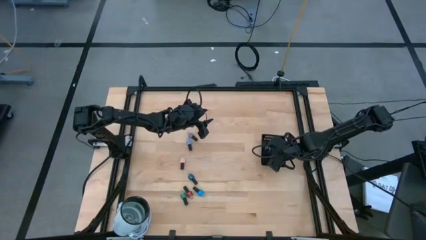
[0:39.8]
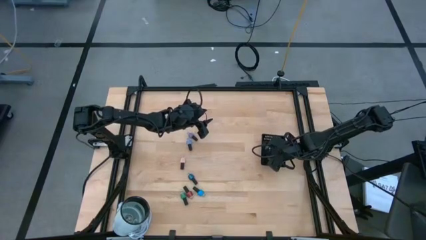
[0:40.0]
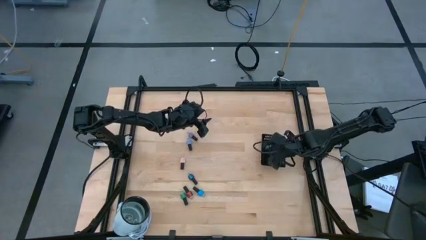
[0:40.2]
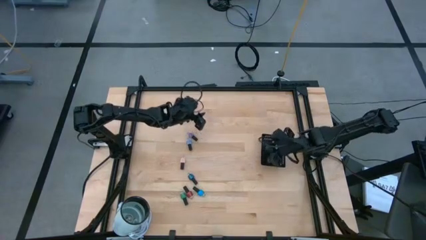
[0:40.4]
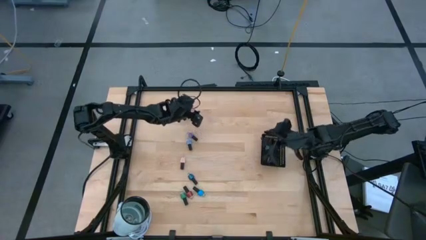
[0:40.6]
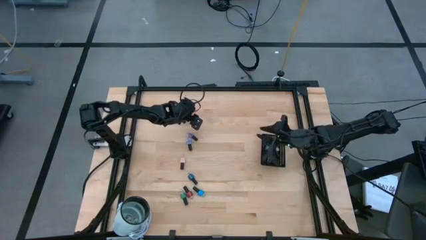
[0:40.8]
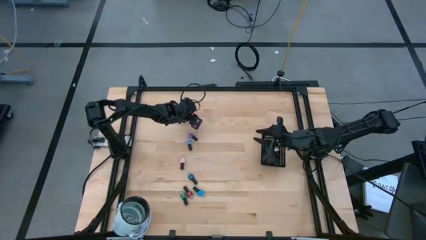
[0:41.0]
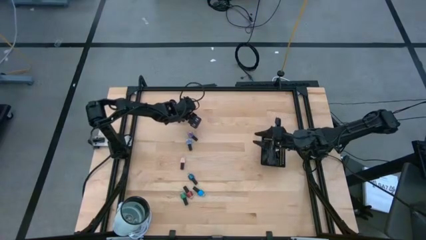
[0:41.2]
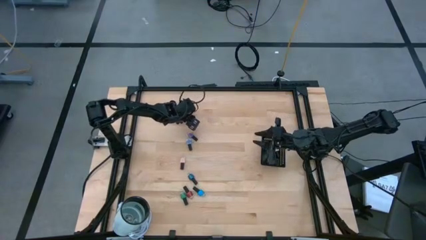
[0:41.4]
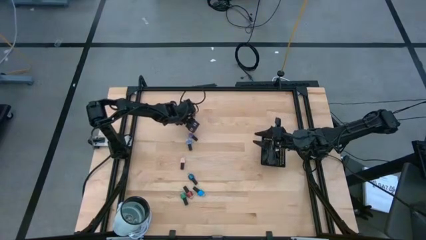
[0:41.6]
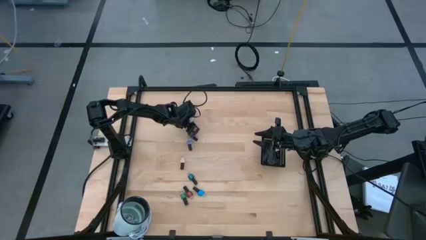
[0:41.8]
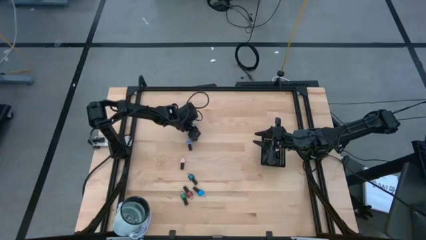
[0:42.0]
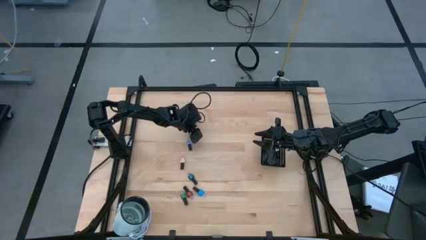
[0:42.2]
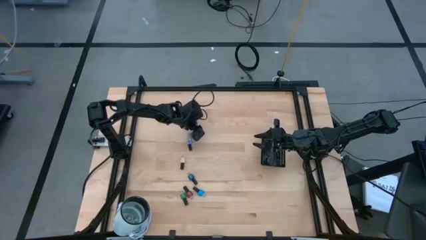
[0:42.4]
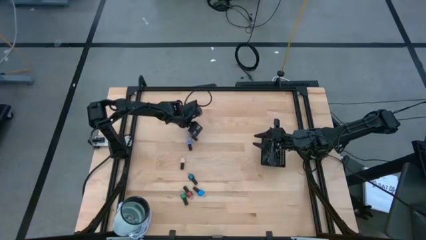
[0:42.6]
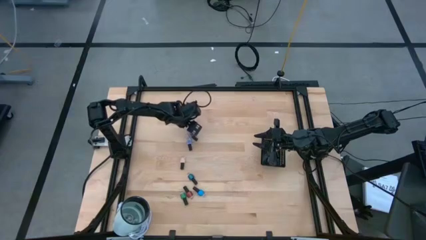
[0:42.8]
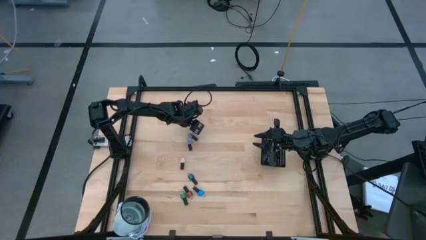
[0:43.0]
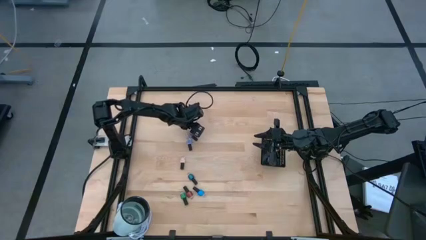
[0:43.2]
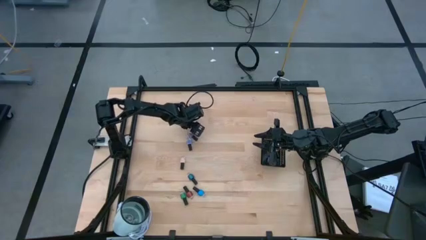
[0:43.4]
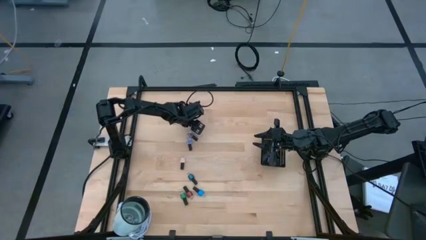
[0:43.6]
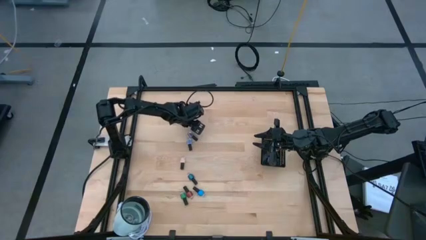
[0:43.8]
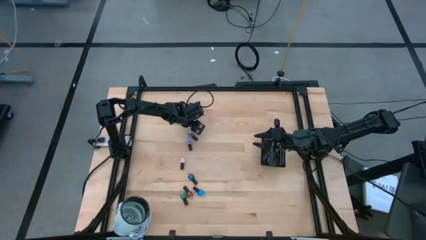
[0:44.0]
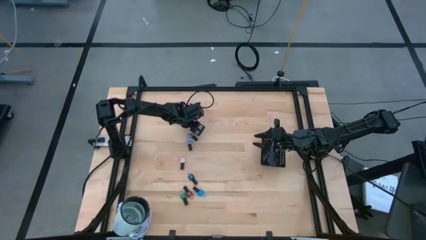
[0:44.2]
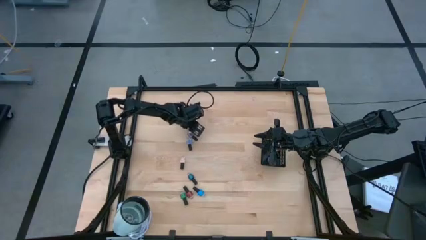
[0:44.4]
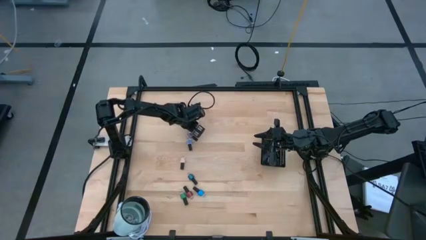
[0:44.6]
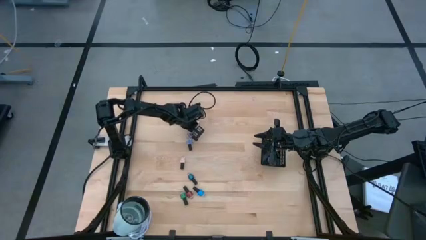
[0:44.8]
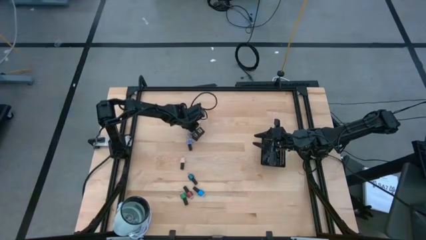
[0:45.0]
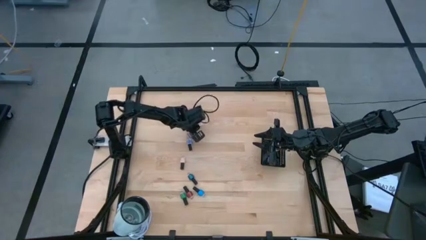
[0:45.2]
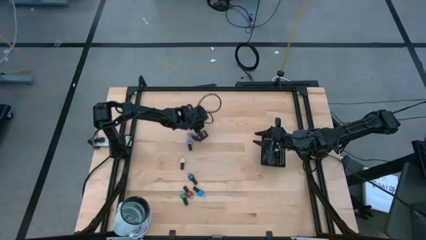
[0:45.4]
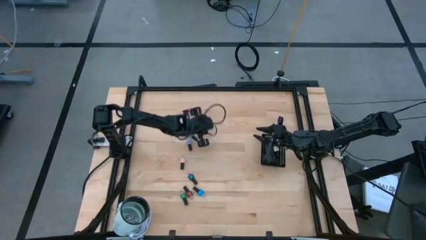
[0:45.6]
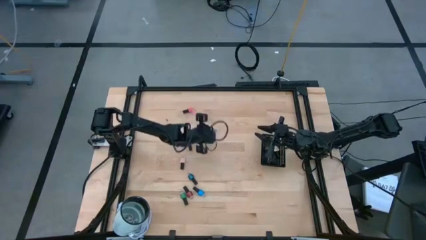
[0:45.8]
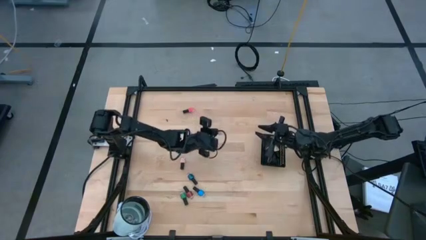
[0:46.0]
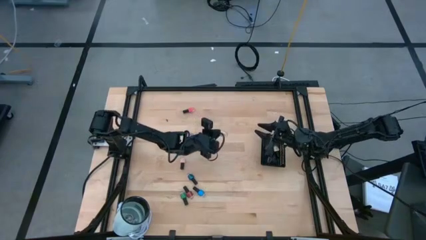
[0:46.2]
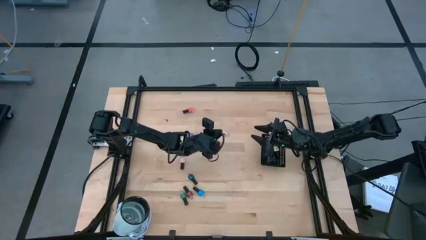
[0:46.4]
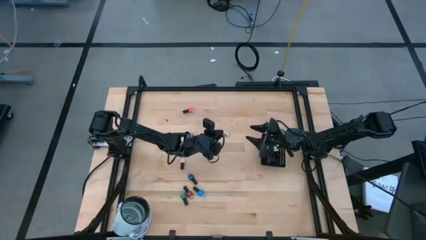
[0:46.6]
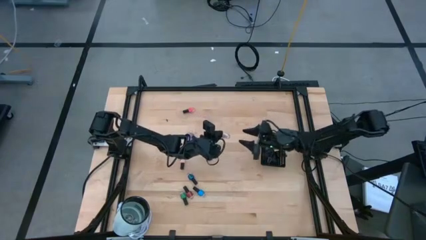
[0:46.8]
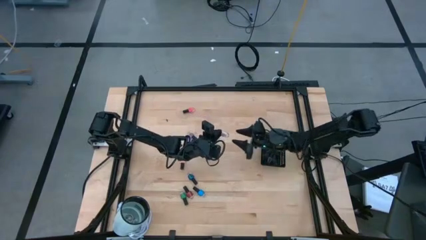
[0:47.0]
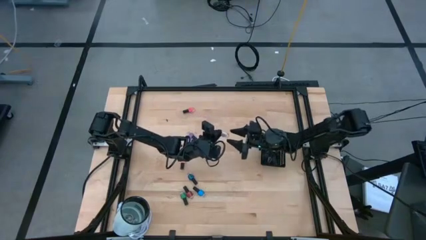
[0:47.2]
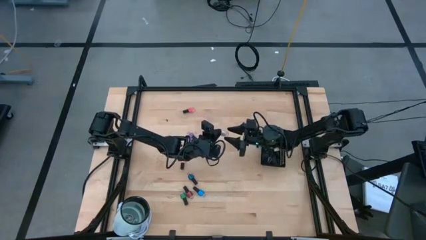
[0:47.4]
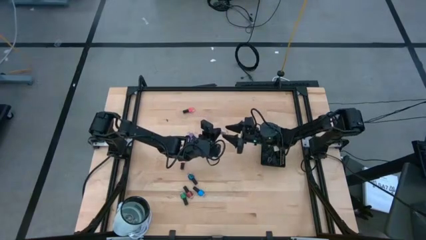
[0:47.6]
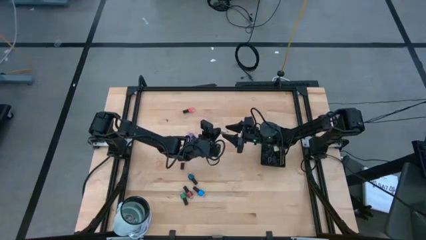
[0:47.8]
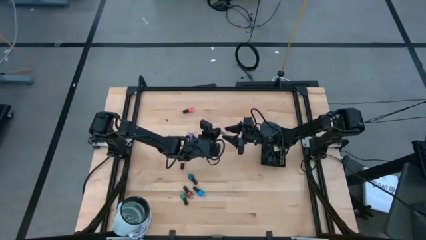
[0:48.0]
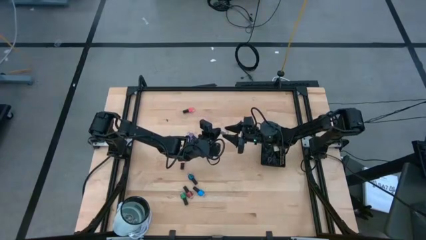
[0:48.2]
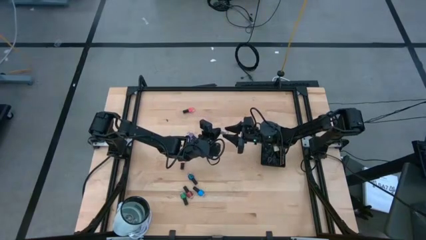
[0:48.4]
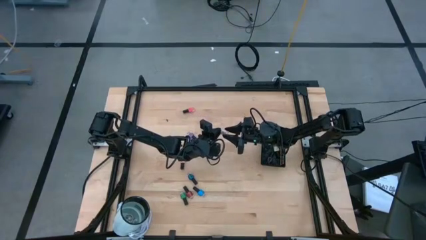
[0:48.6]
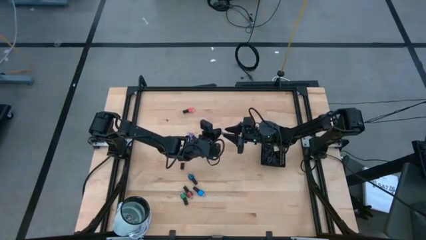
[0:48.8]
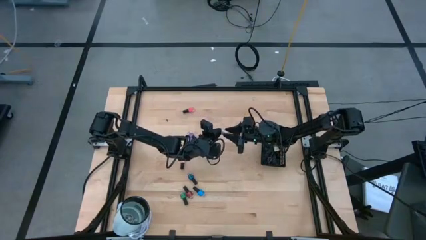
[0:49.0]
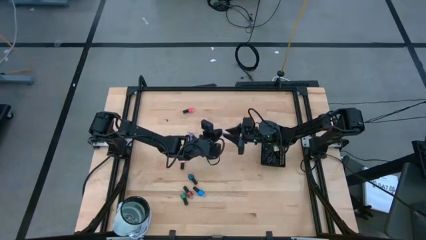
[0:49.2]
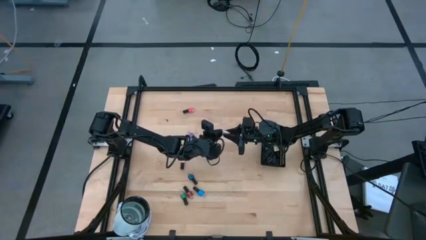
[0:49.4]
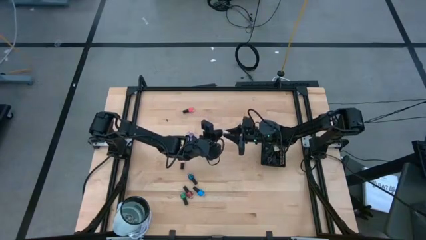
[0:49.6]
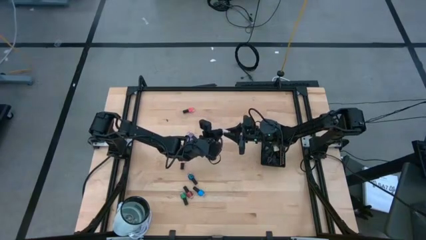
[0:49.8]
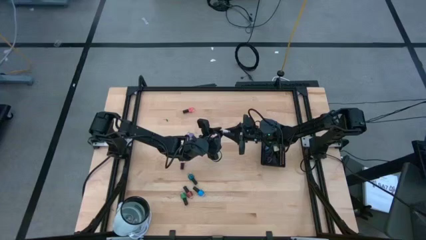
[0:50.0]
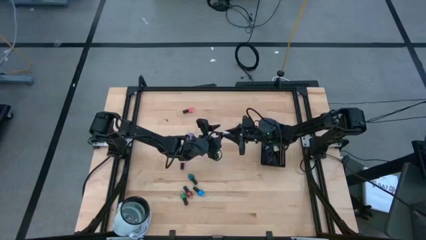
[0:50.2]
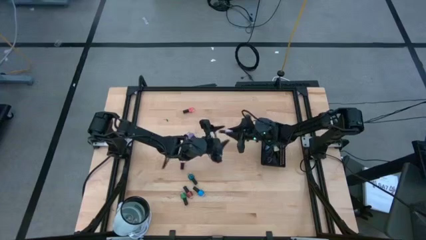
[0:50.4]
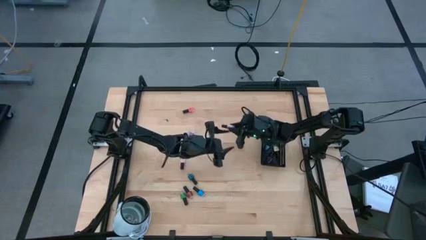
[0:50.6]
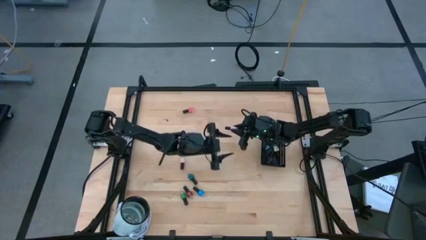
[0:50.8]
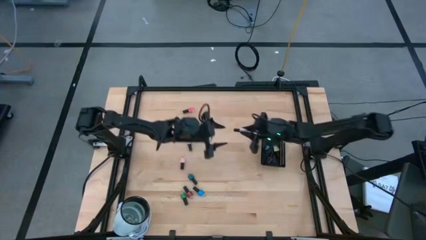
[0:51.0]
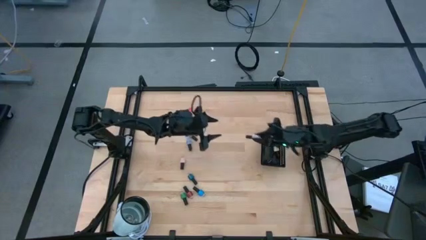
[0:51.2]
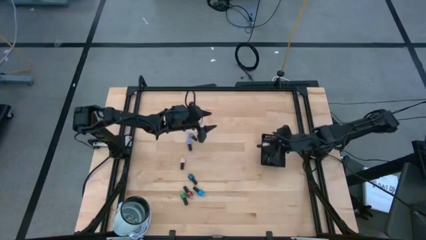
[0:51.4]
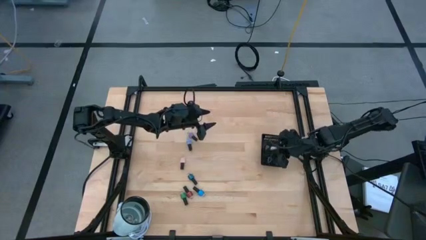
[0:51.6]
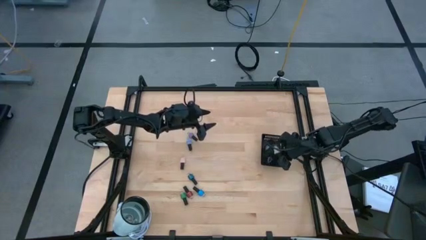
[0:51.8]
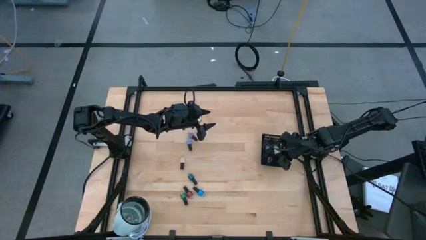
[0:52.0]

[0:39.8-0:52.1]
Task: Pick & Place Nail Polish
Put the white nail polish into the black basket
